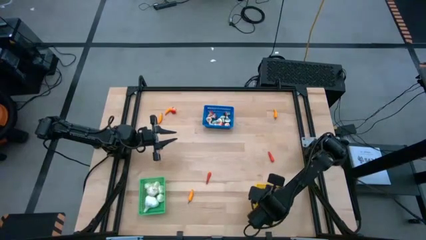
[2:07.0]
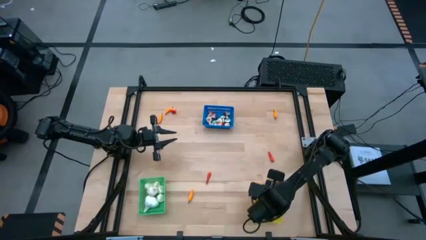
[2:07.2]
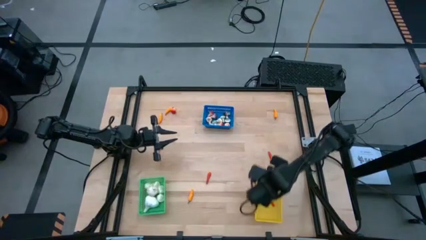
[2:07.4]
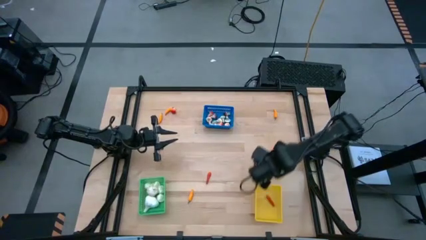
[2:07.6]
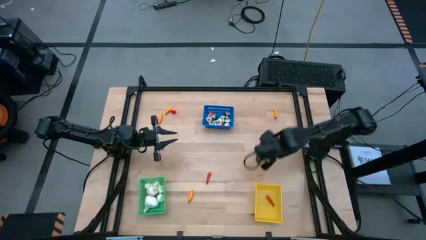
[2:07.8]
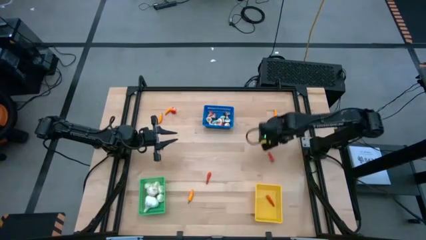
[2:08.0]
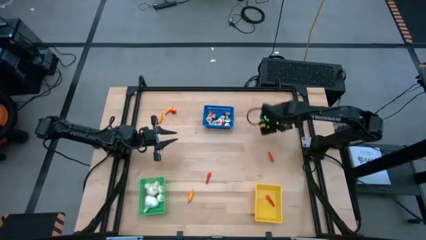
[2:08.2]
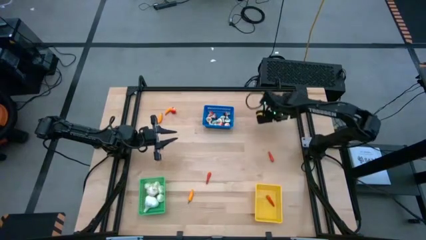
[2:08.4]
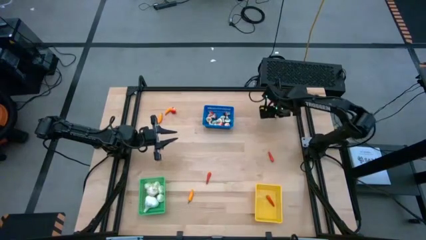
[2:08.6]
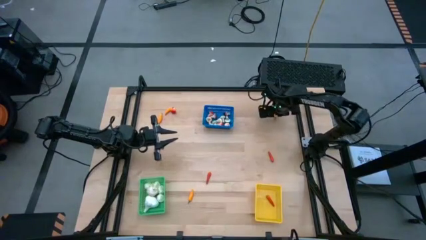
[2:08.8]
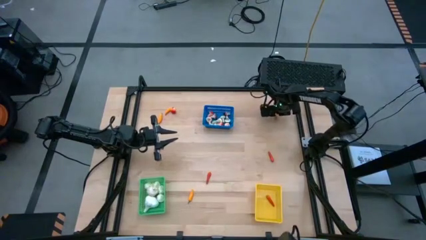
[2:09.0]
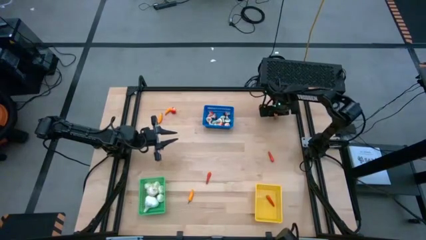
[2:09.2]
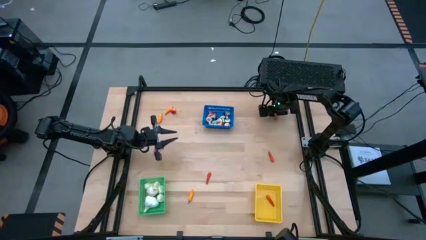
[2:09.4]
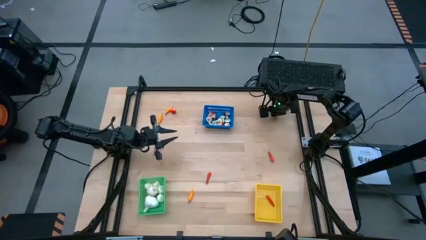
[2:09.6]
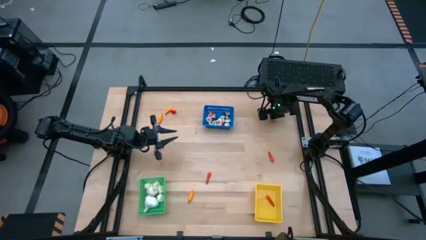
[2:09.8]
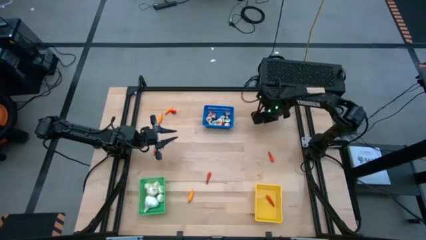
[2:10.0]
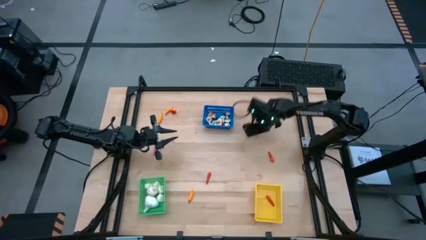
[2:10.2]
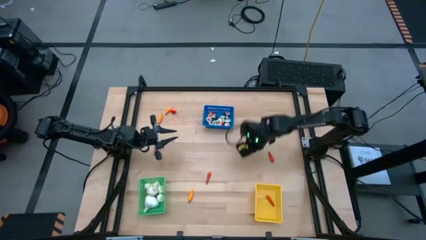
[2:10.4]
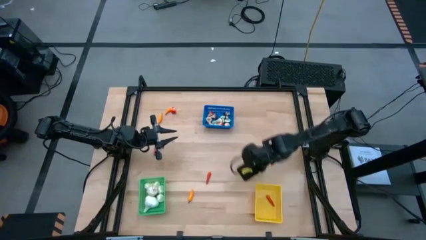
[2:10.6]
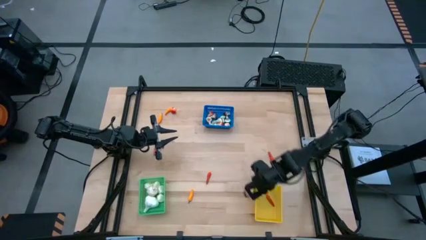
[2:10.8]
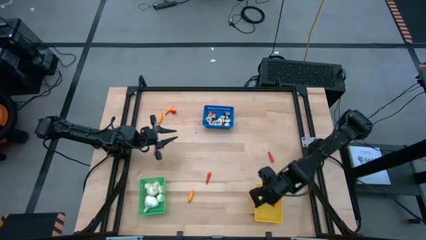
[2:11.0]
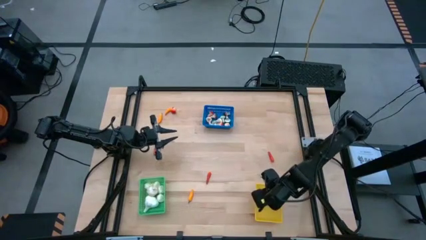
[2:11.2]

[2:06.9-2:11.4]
Task: Sort produce into baskets
Put the yellow chili pepper into the yellow bin

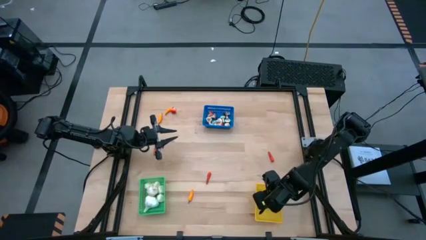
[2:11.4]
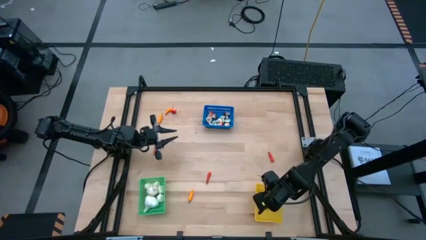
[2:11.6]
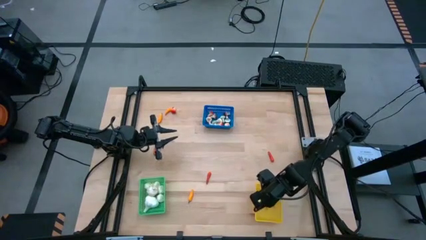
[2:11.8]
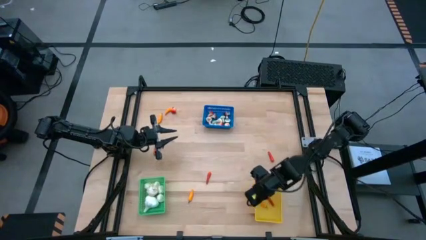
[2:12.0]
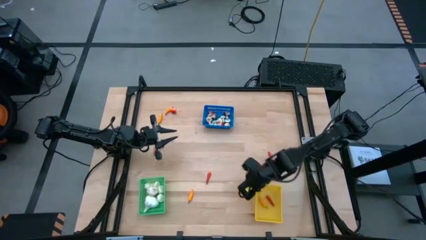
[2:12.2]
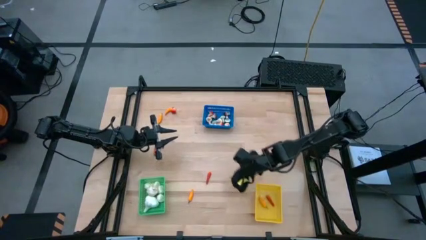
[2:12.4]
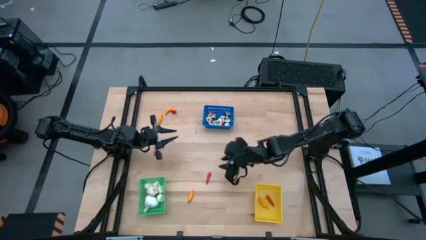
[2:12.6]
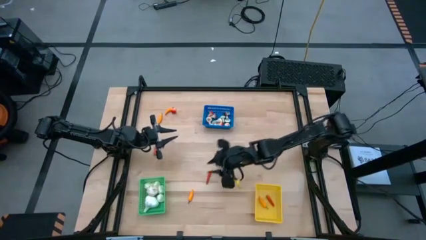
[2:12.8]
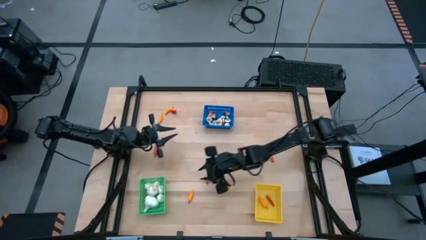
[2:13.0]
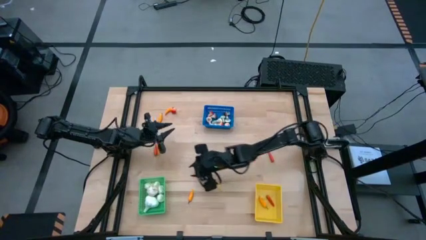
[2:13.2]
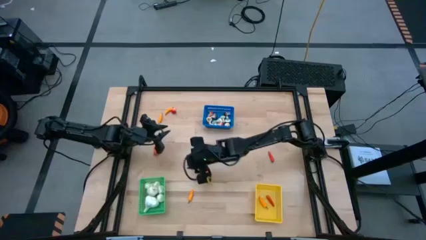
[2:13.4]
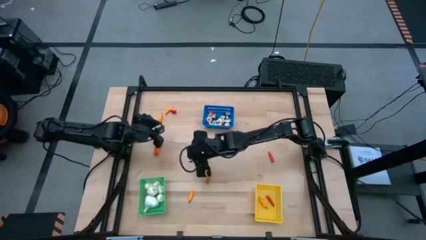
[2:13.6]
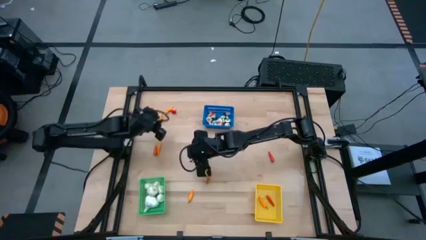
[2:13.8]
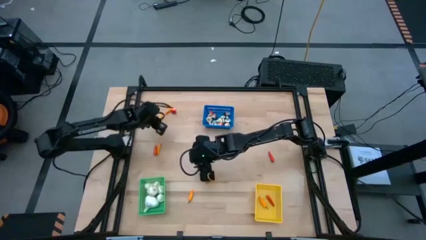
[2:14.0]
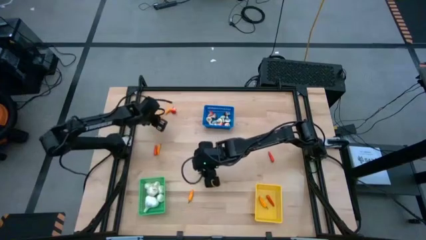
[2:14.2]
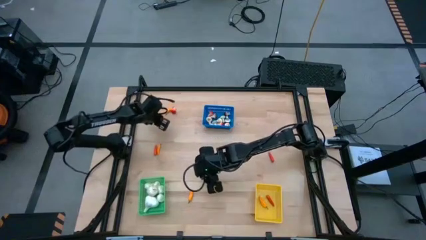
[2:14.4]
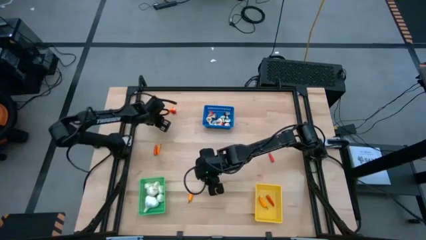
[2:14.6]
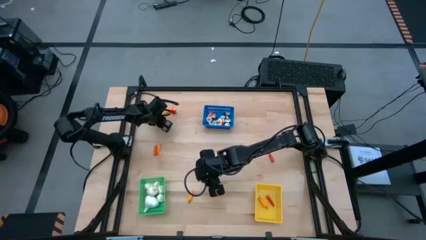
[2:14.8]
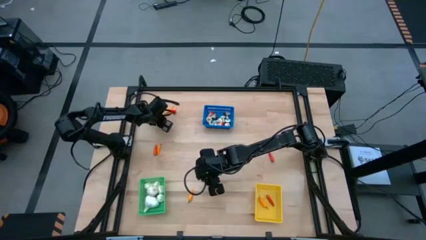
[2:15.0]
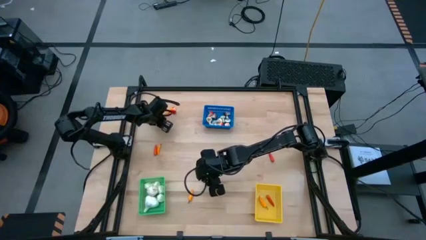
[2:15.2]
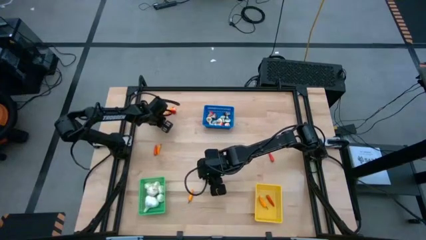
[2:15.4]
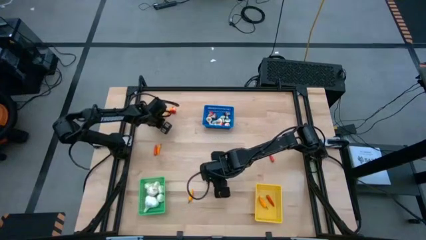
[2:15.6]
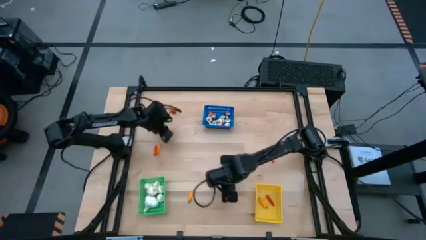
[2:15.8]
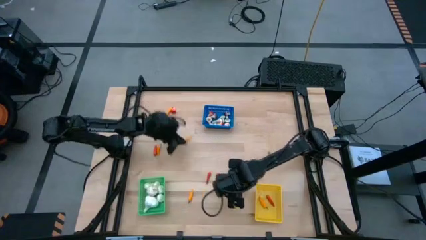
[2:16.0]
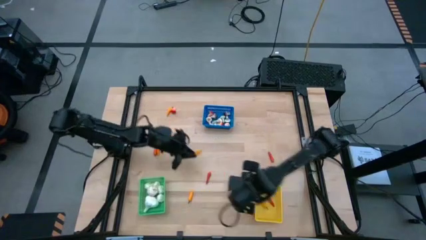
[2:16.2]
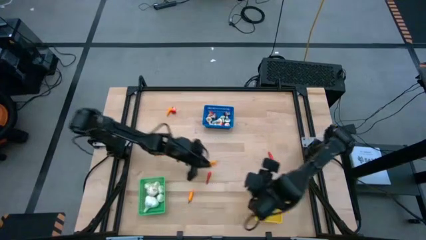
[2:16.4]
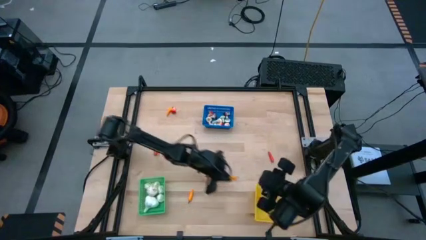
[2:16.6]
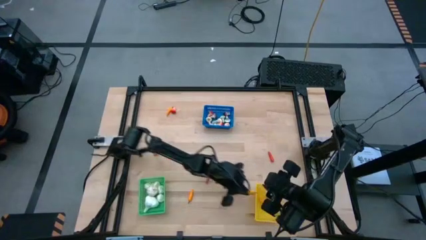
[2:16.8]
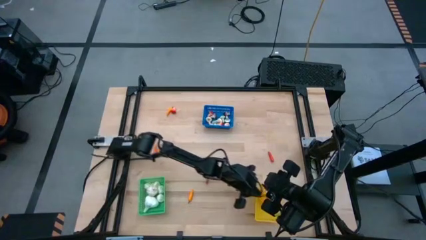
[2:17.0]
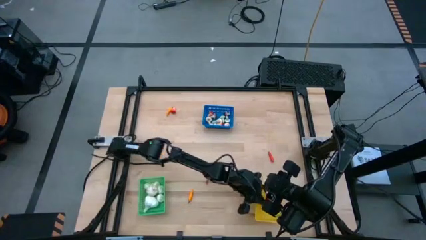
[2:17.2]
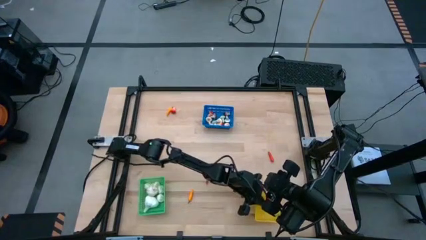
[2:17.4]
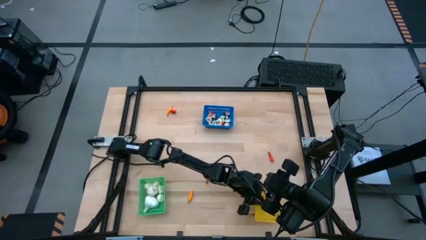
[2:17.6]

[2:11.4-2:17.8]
Put the yellow chili pepper into the yellow bin

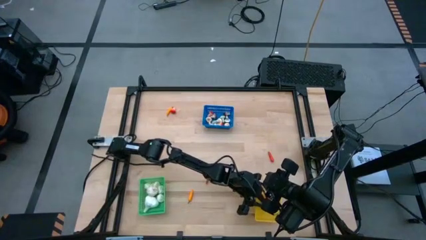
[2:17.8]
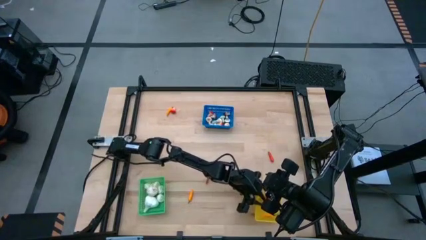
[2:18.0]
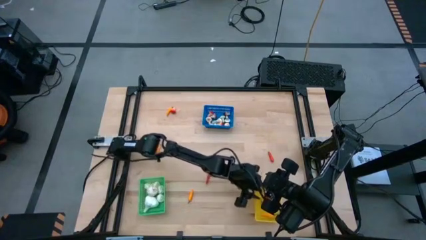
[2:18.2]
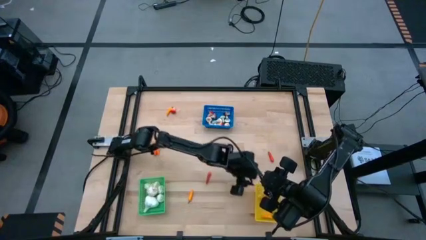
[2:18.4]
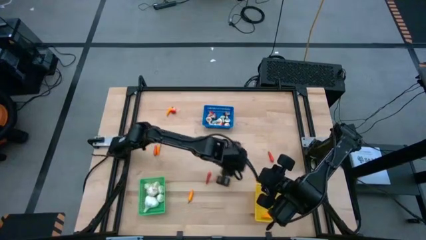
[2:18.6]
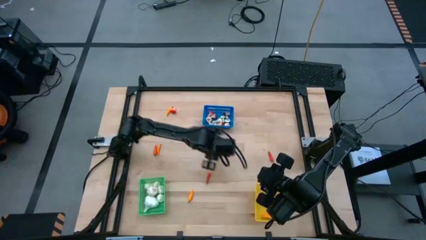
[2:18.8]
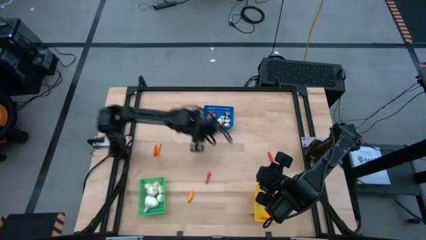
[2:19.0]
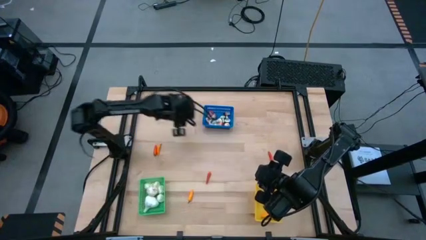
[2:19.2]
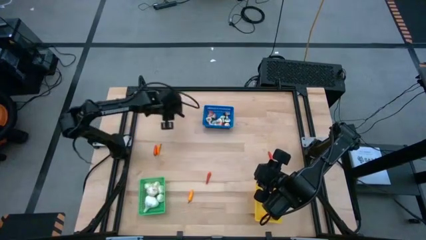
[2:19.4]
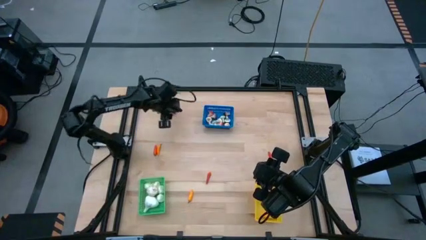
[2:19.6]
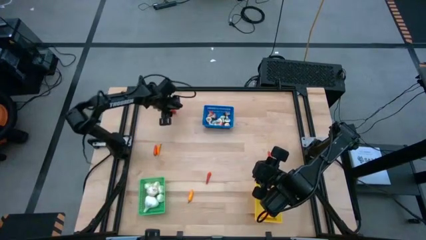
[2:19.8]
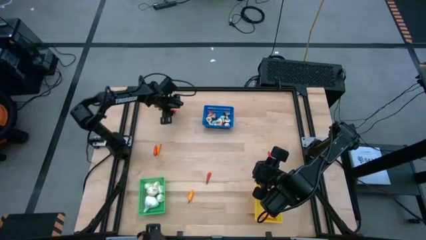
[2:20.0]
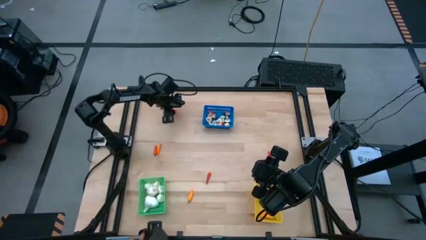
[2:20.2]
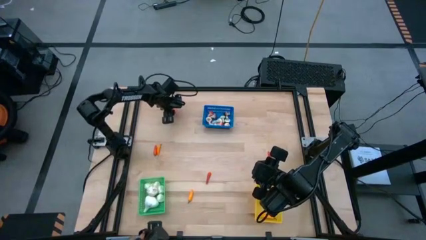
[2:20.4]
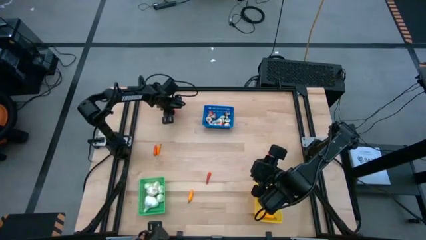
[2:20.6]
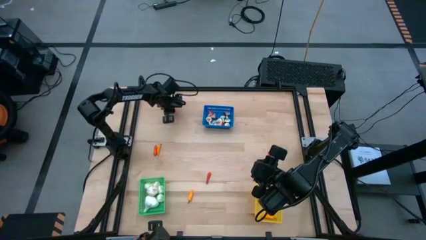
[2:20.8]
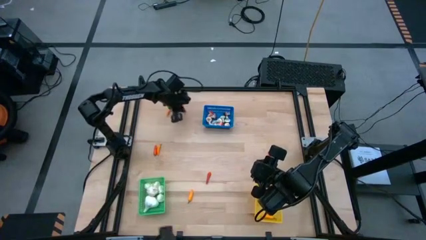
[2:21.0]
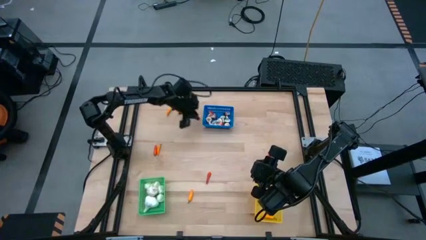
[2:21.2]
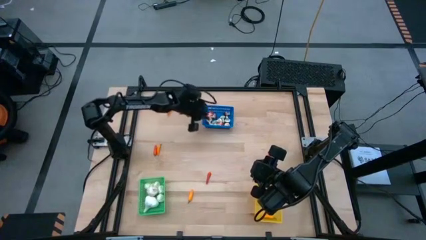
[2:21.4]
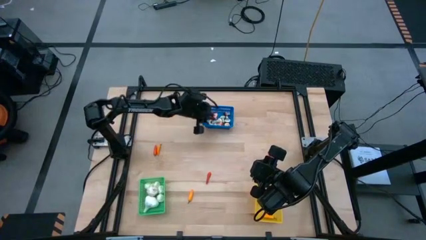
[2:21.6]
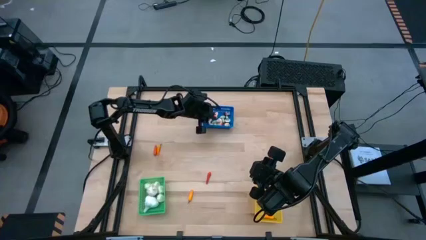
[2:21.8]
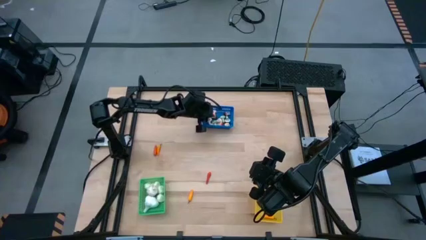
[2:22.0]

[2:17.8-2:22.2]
Put the red mushroom into the blue bin

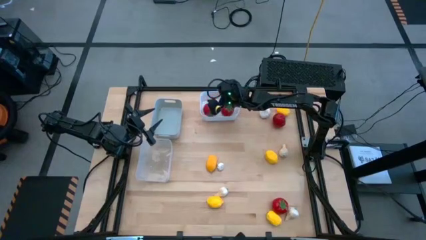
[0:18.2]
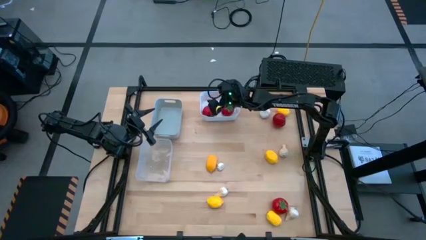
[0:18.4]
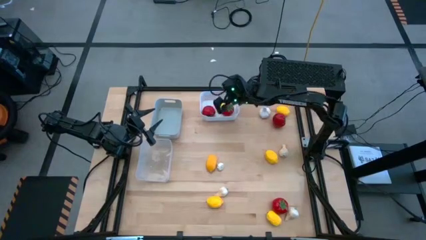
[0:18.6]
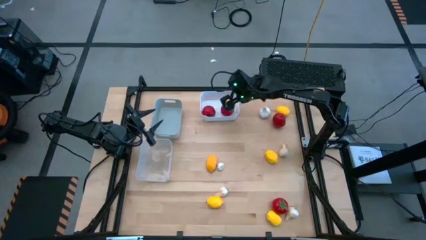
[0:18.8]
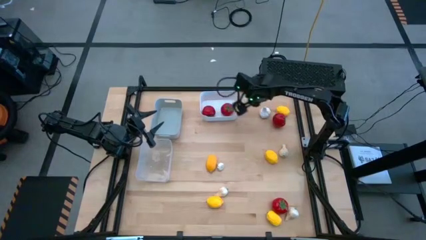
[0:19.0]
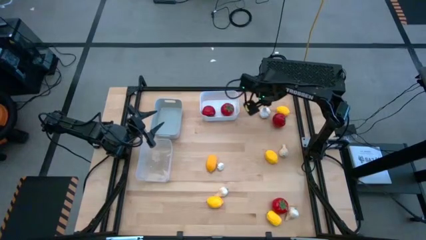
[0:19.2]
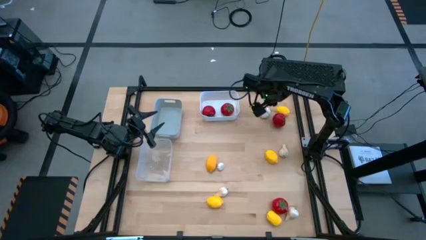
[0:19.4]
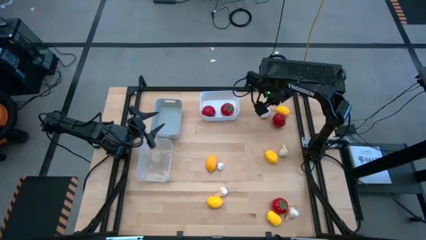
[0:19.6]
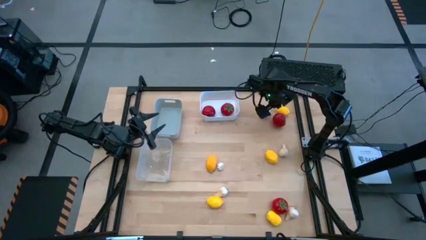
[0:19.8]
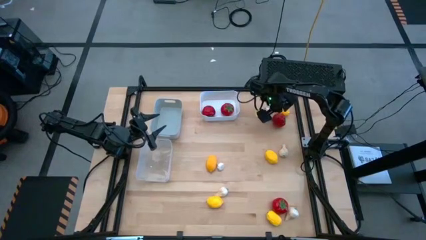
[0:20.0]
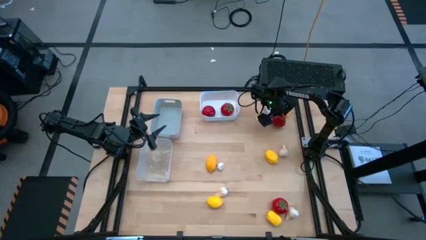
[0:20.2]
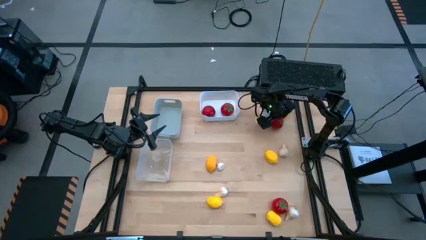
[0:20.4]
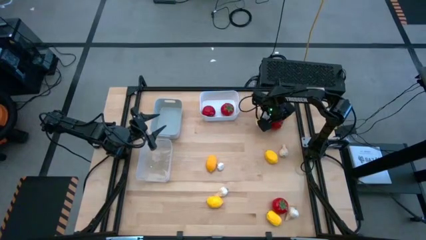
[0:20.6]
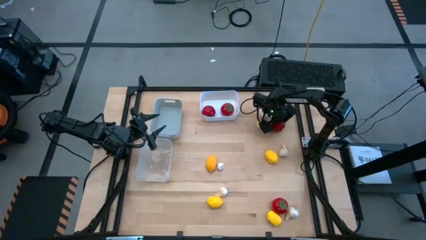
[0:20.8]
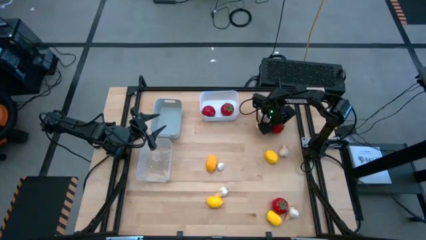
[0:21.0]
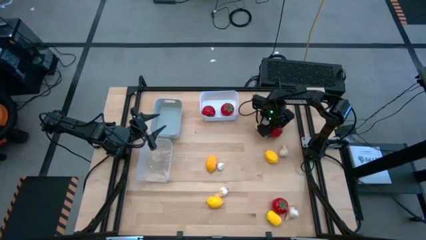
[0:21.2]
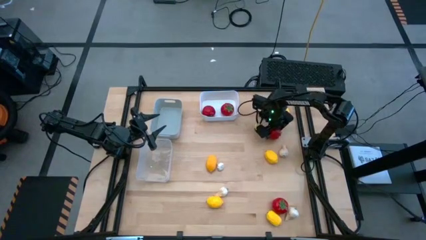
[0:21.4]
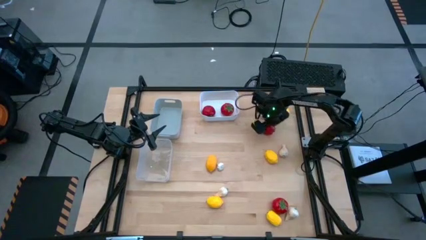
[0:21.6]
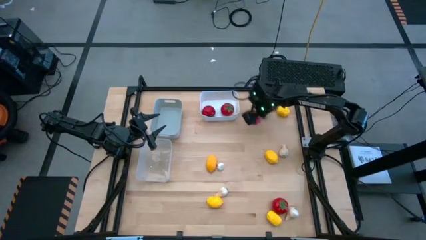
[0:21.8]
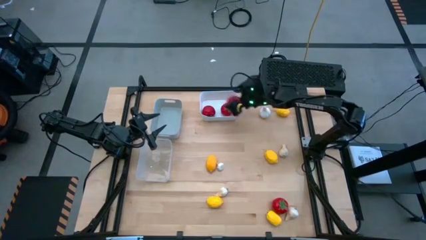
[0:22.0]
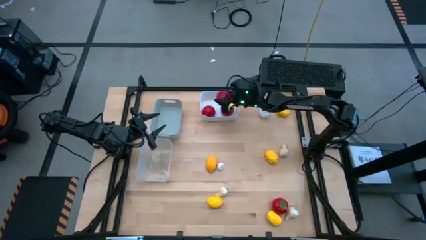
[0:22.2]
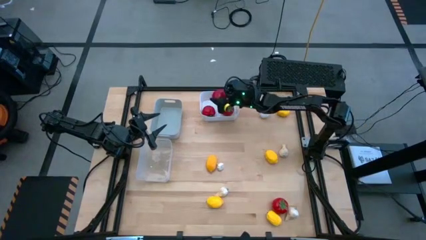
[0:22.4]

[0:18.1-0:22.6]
Task: Sort produce into baskets
Put the red tomato into the white bin
